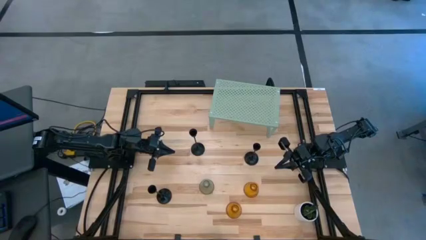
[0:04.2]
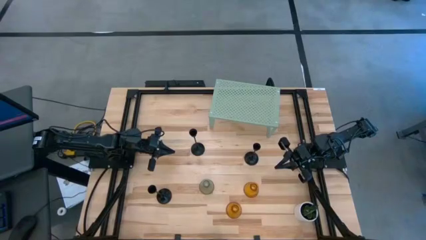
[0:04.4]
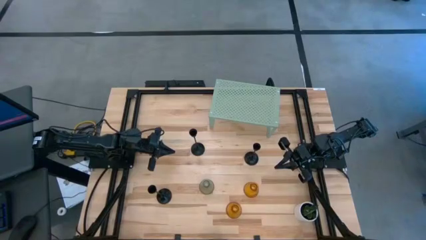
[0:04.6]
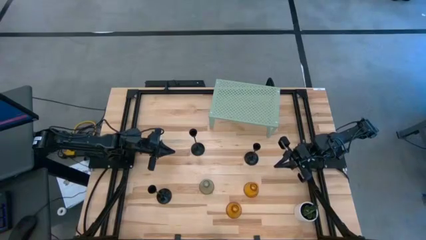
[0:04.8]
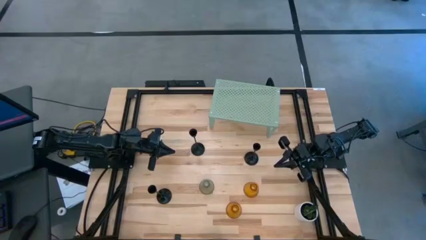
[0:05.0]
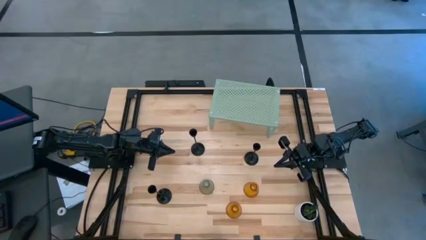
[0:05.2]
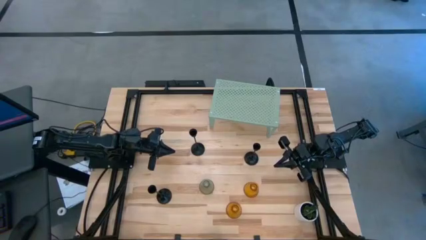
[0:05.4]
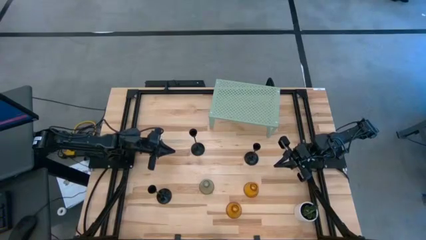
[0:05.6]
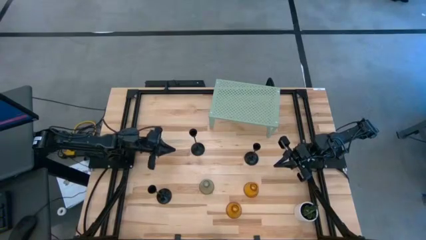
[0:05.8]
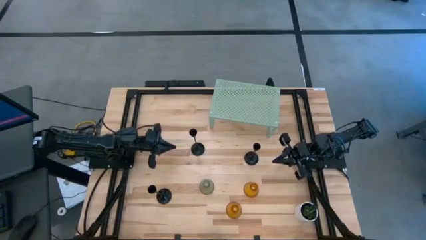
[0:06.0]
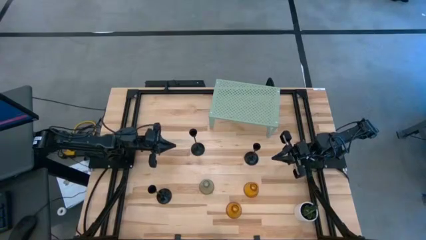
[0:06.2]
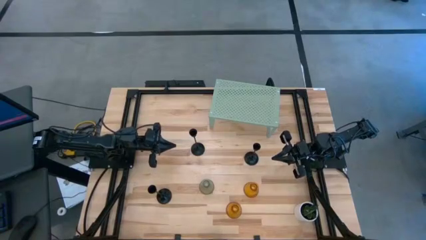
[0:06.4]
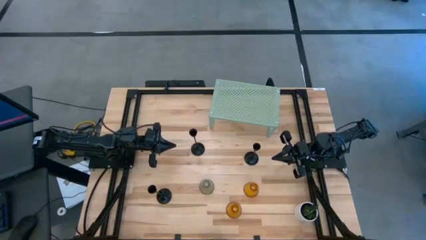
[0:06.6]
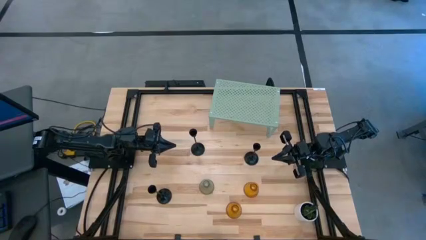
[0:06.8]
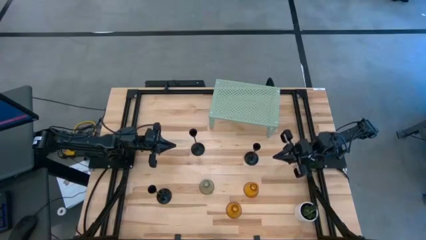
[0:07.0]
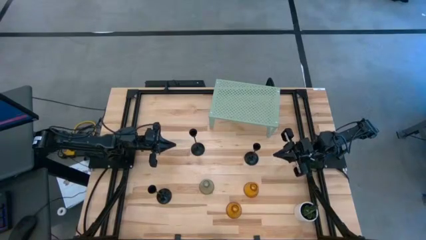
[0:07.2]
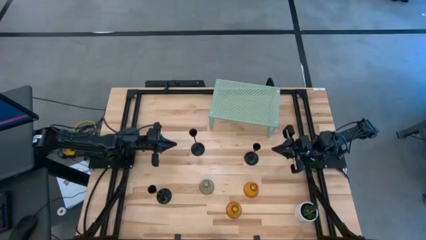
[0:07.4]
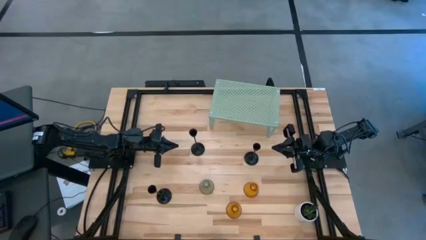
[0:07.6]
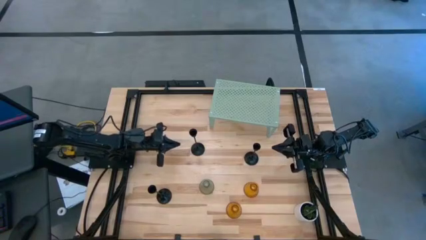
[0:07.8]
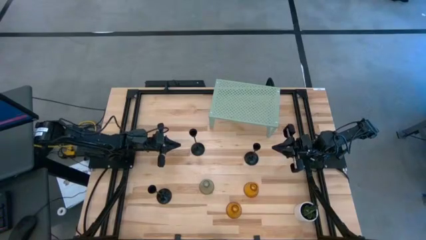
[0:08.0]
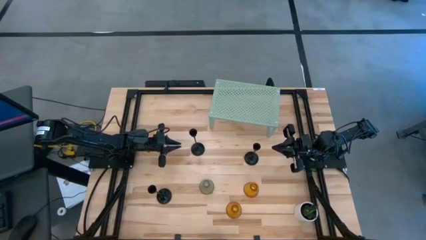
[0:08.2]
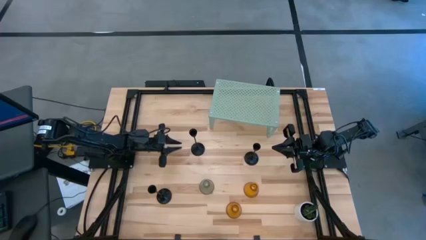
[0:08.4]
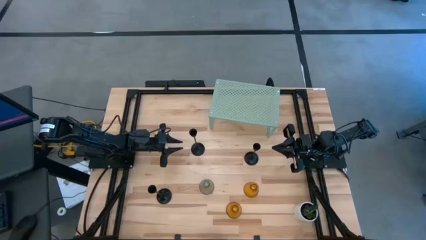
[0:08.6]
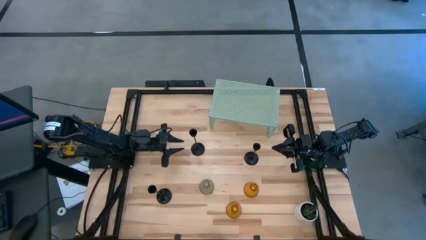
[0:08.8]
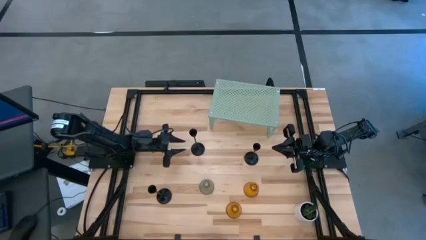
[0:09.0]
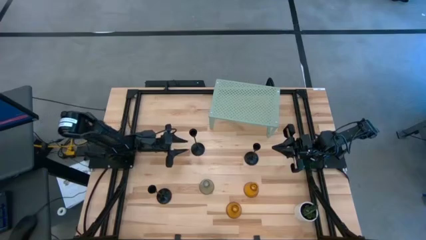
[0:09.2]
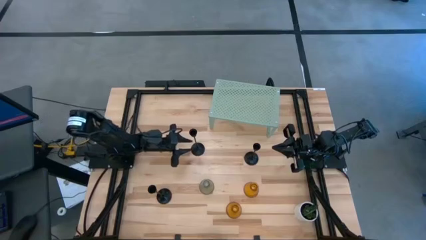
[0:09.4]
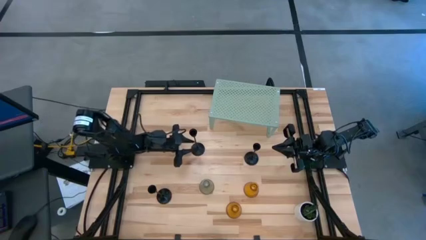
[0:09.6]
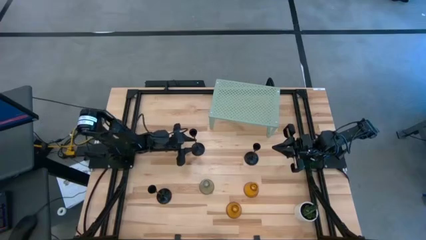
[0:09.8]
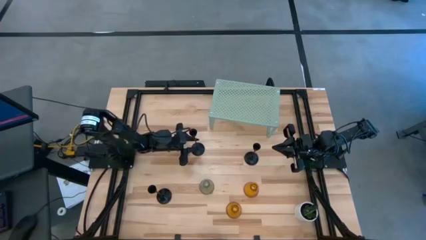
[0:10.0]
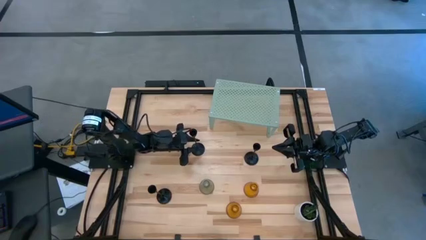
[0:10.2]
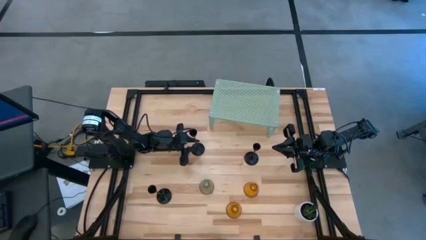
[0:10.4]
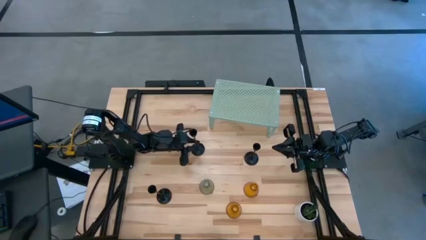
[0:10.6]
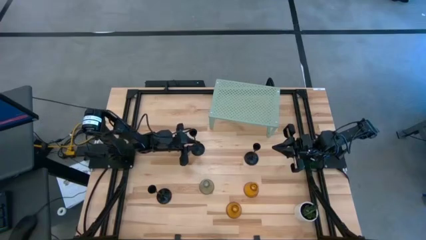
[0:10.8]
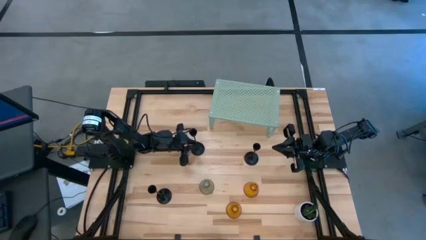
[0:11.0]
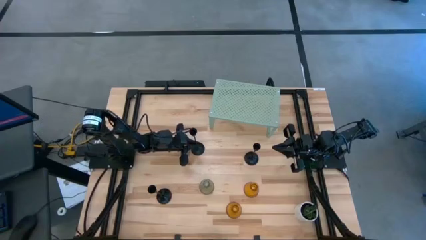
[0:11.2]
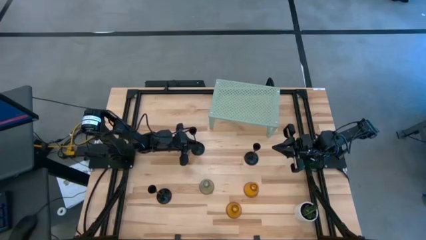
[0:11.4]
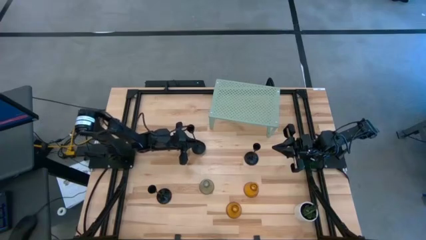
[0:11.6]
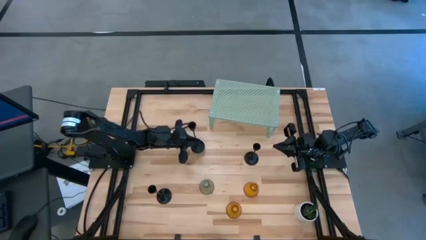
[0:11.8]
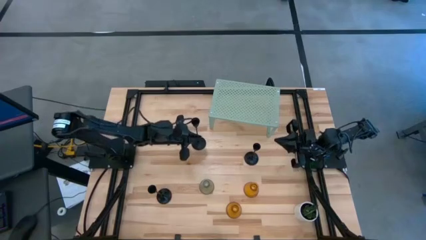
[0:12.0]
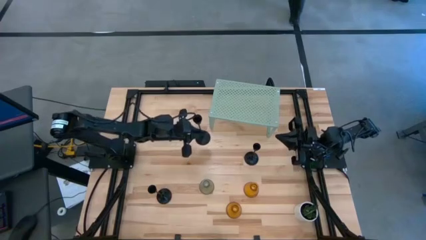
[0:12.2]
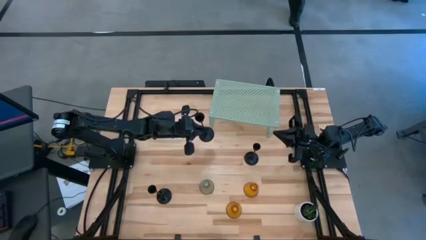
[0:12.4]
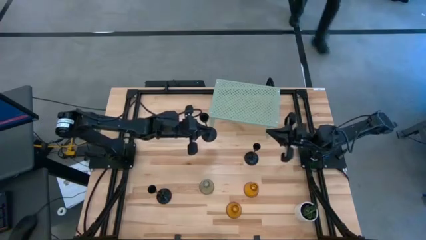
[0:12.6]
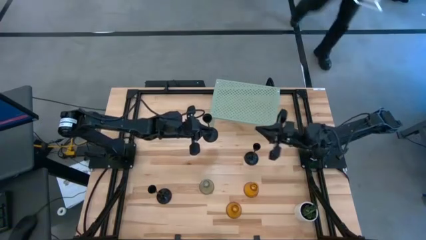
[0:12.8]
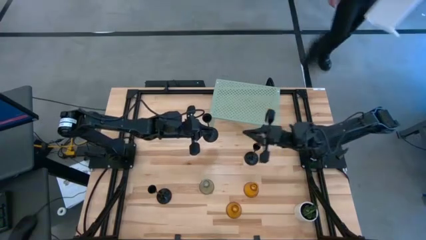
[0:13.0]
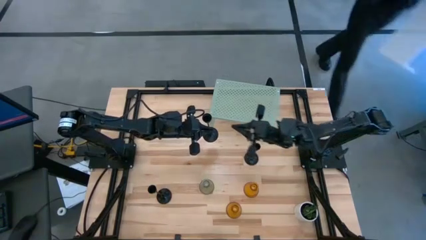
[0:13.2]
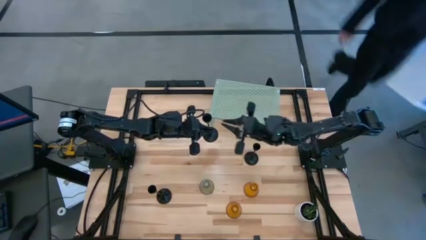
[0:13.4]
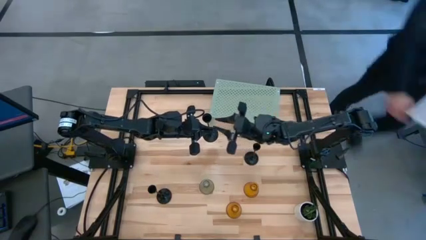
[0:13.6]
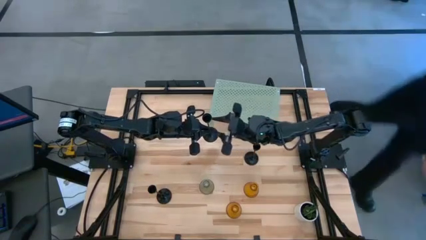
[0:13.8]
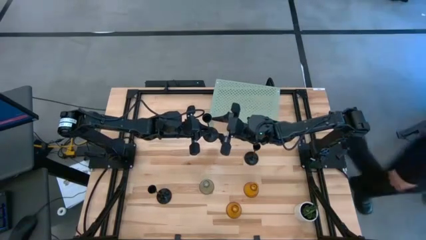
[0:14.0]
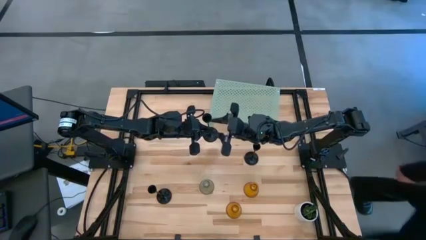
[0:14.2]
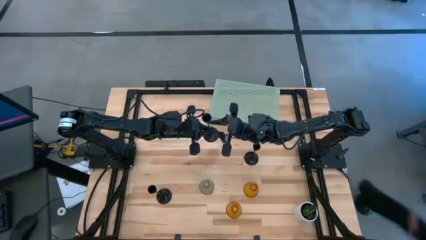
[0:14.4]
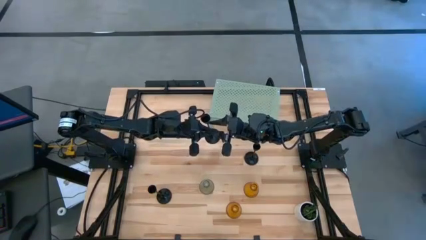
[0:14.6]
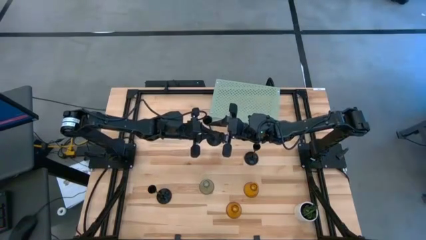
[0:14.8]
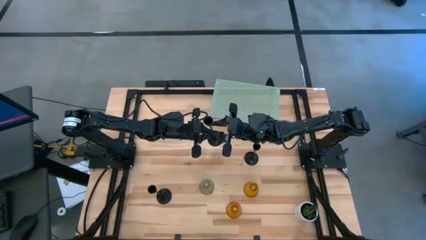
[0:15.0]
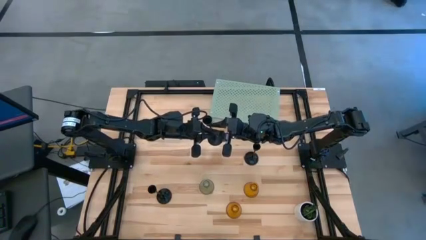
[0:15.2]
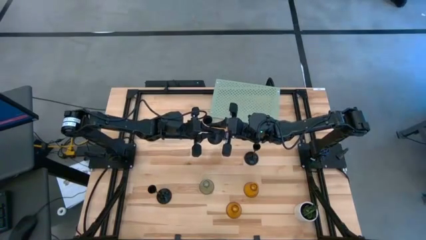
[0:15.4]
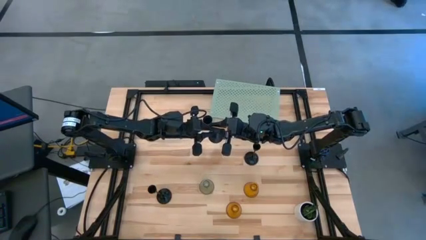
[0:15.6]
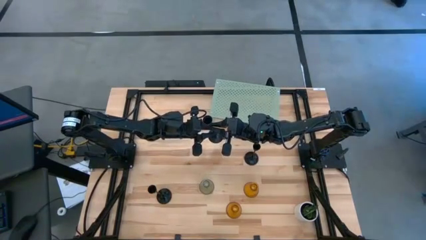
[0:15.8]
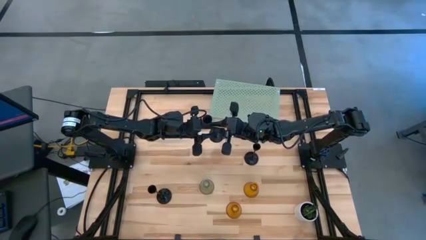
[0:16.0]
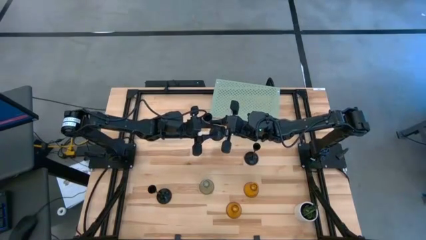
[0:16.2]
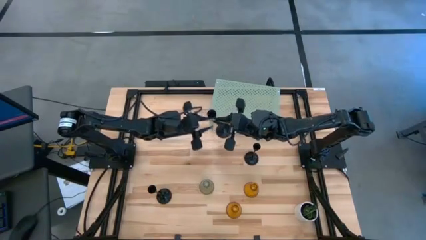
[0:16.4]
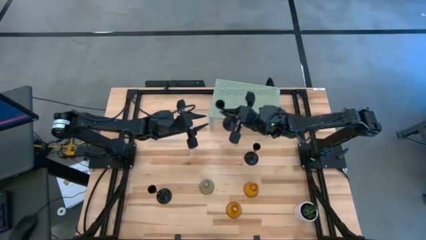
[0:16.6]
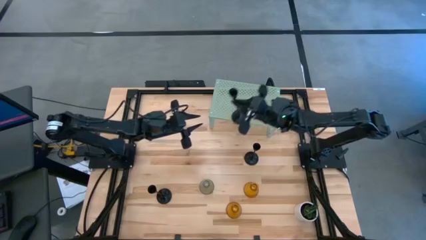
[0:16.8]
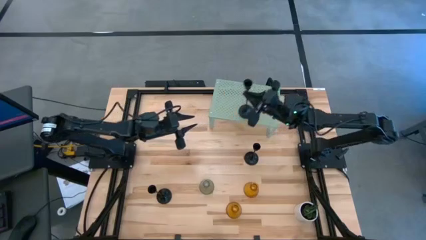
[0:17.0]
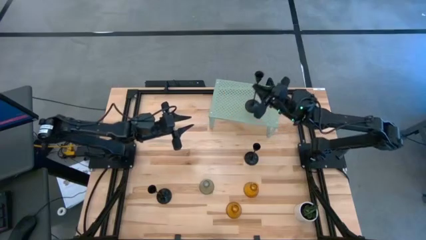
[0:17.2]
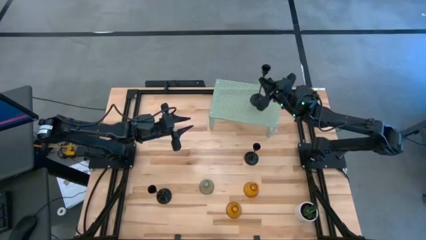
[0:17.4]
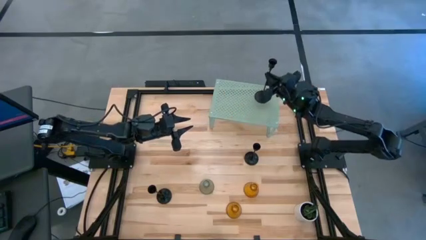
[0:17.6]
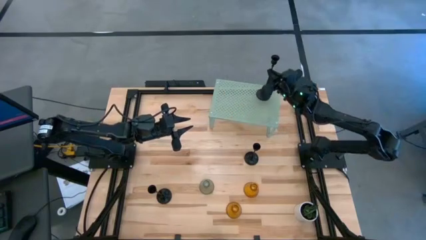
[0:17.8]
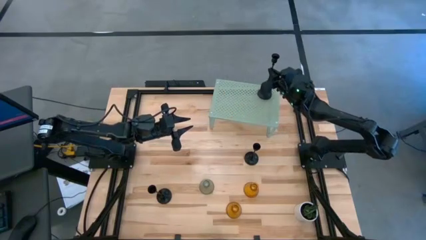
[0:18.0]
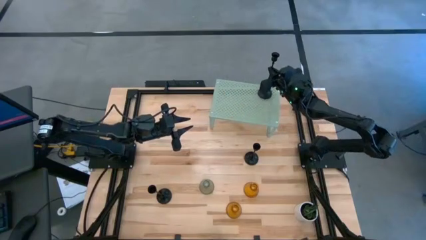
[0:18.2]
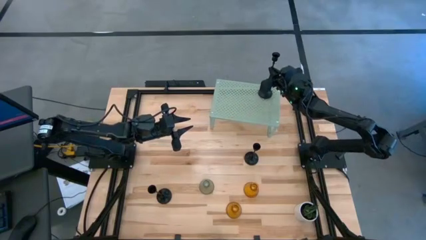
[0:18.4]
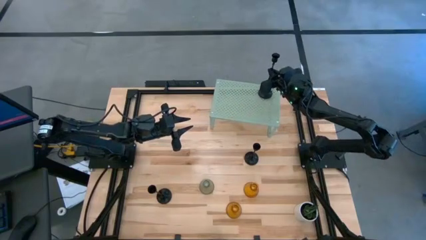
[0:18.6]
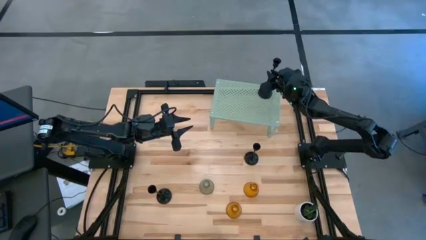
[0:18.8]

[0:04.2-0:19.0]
Task: Pick & Place candle stick holders
Put the top middle black candle holder on the shelf
